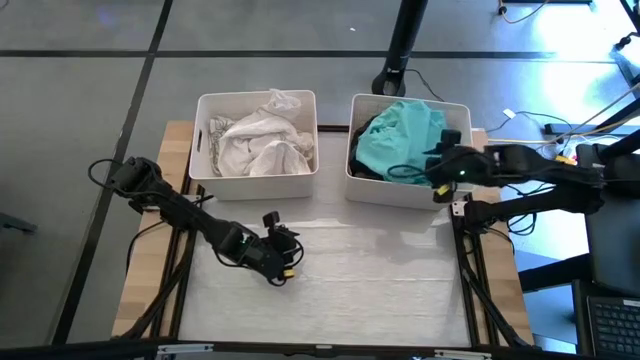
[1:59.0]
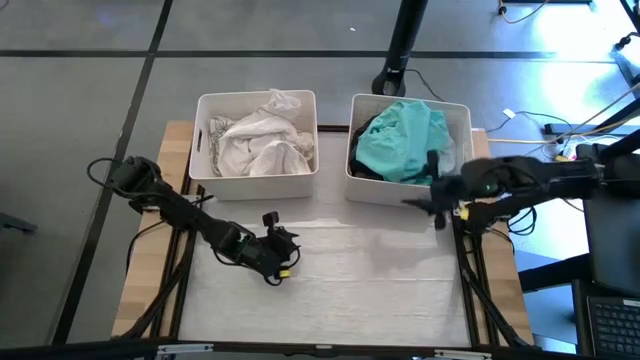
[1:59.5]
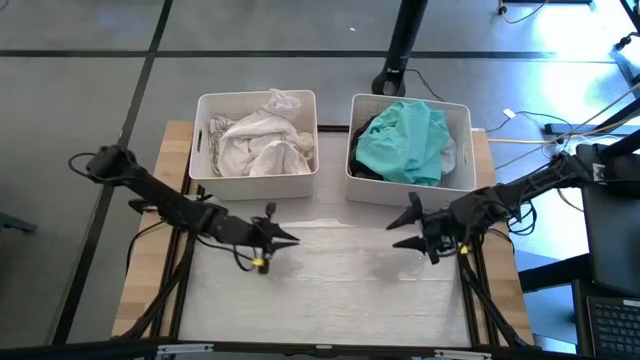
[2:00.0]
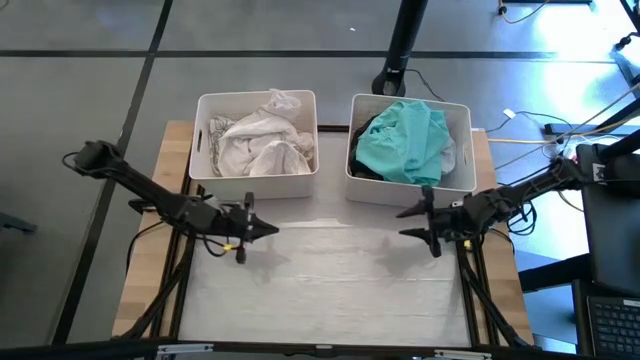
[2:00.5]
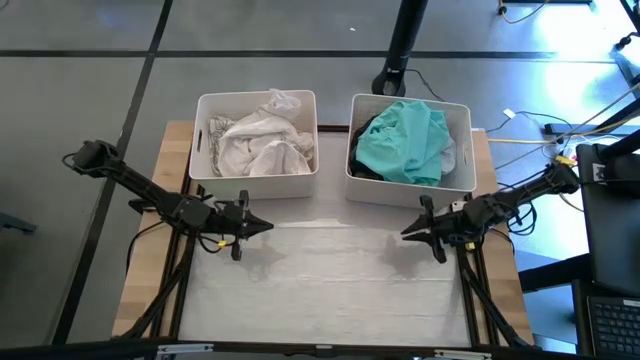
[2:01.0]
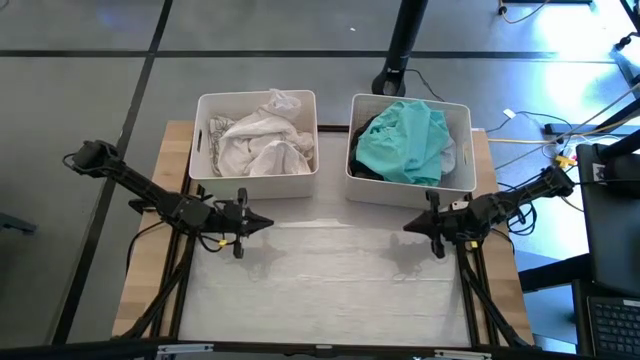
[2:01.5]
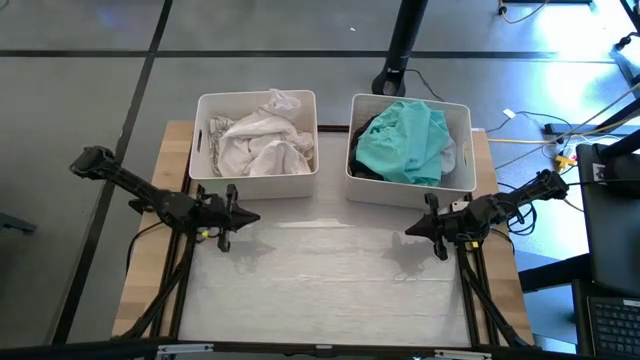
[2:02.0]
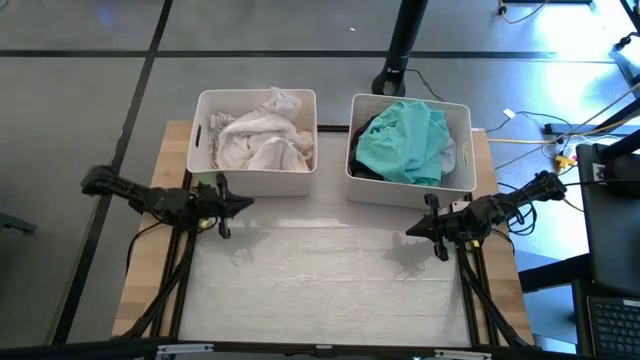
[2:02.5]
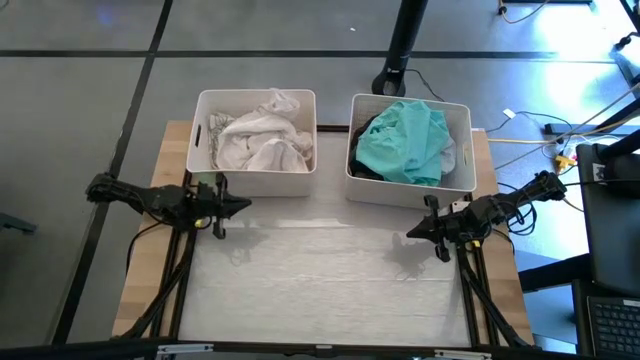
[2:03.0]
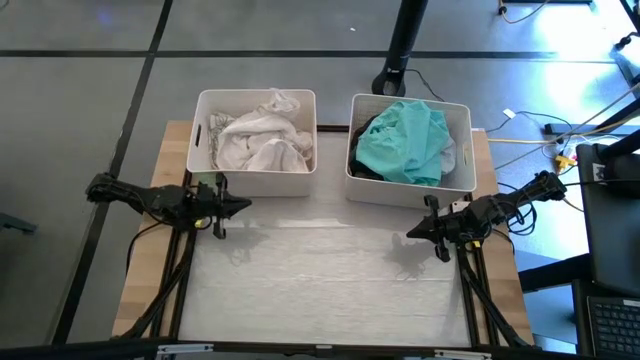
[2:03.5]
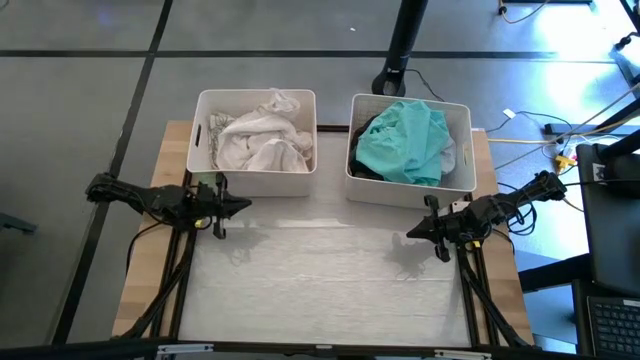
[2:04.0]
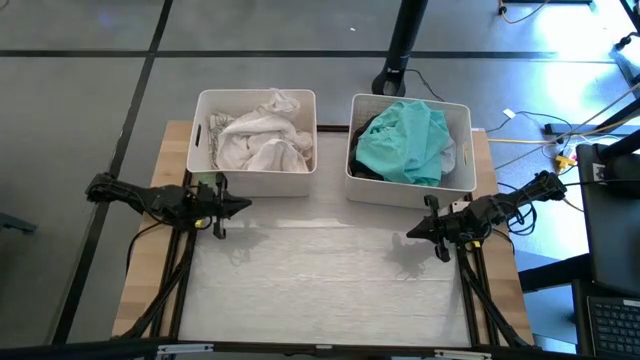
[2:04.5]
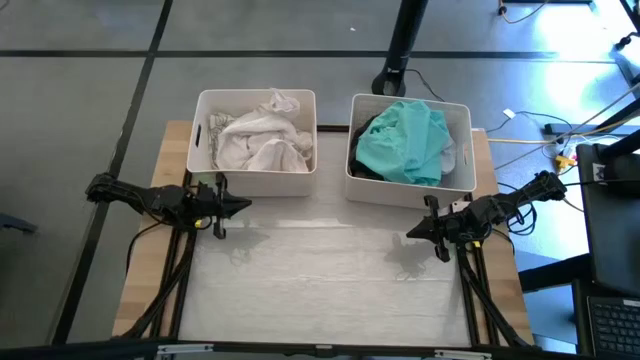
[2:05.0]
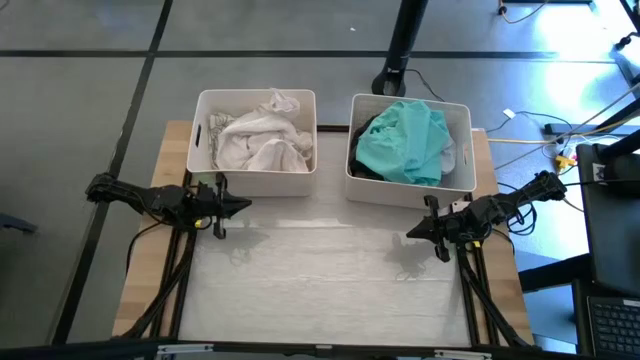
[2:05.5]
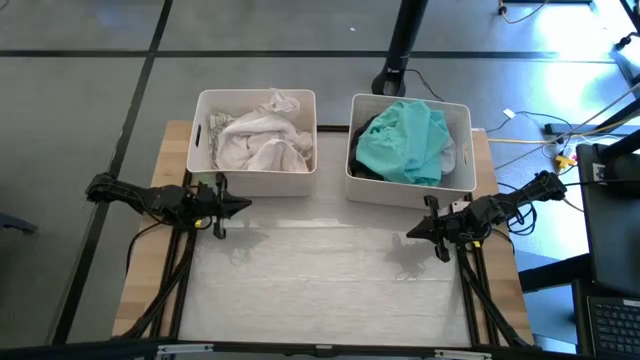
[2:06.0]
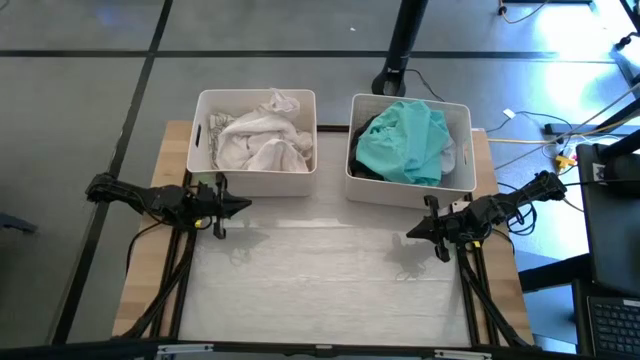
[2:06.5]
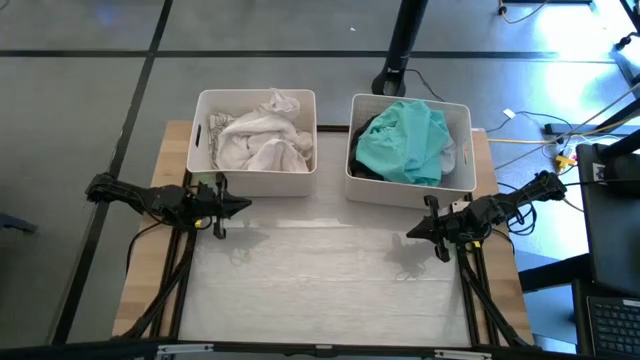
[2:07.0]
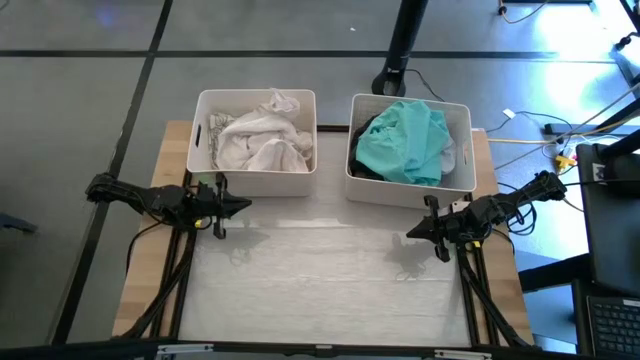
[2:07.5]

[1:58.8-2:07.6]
Task: Sort clothes
Return to Home Position

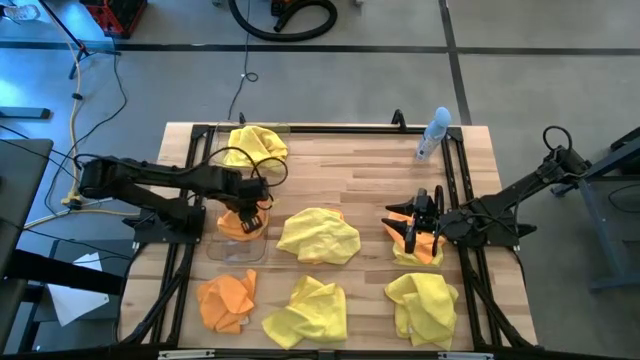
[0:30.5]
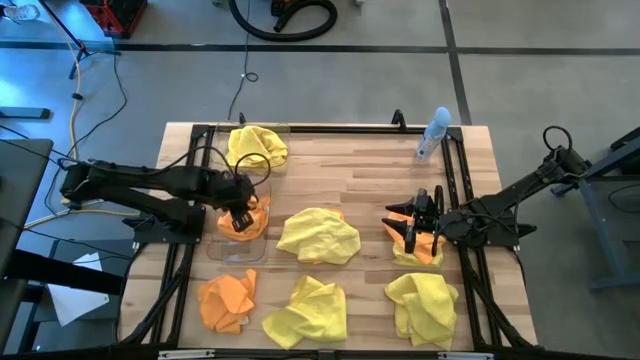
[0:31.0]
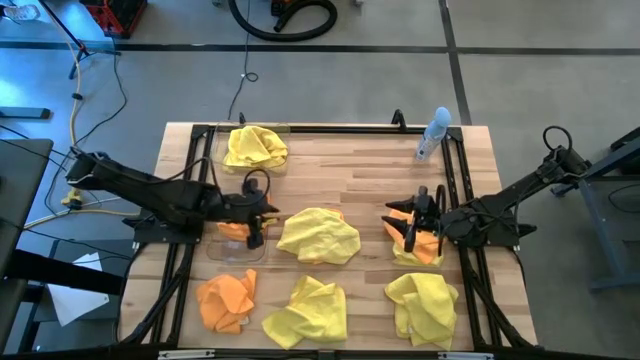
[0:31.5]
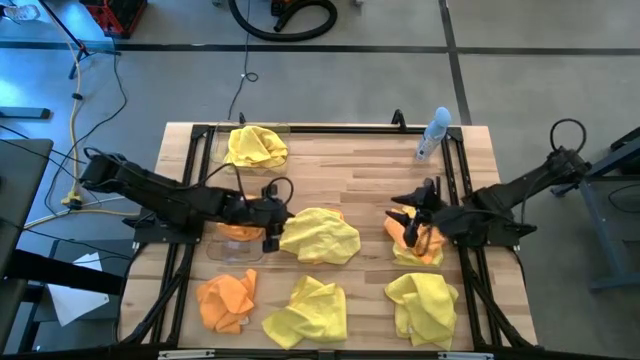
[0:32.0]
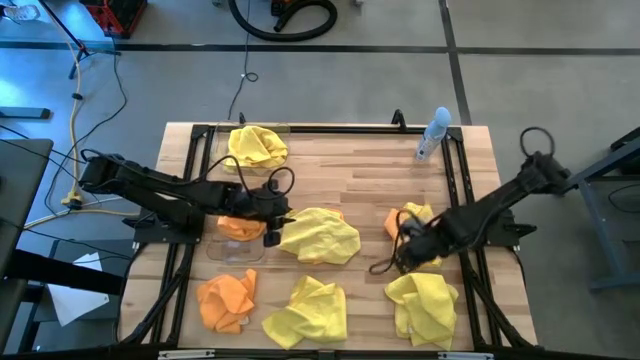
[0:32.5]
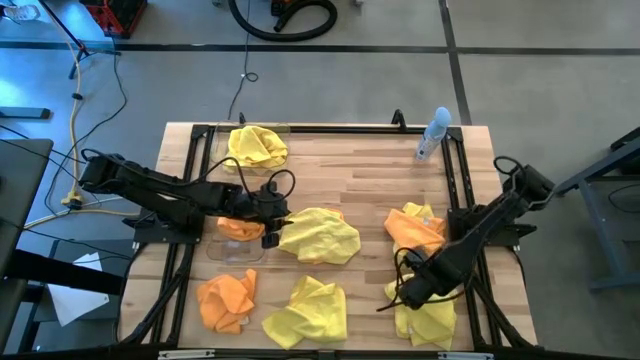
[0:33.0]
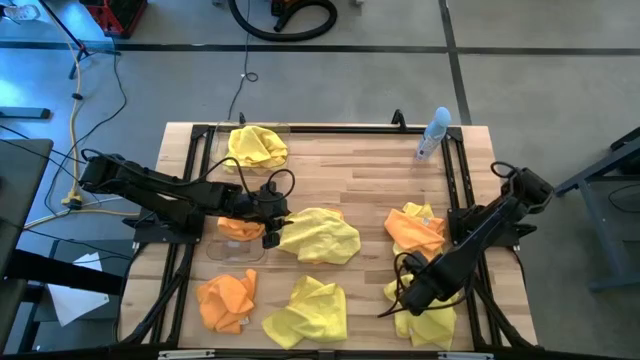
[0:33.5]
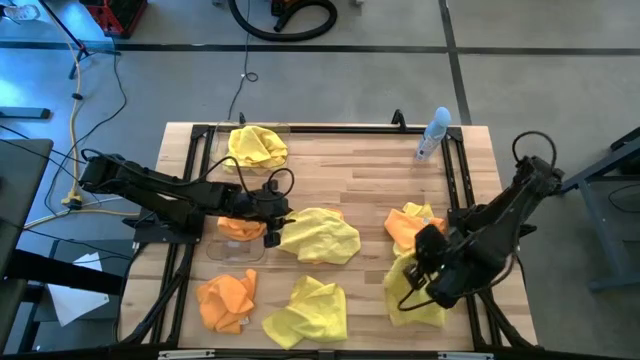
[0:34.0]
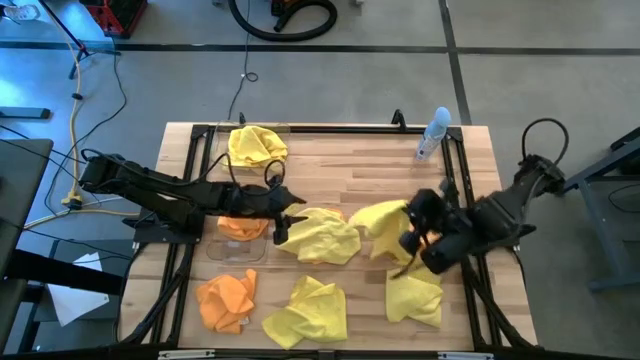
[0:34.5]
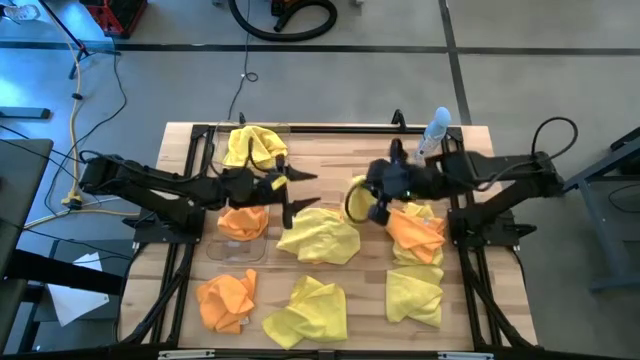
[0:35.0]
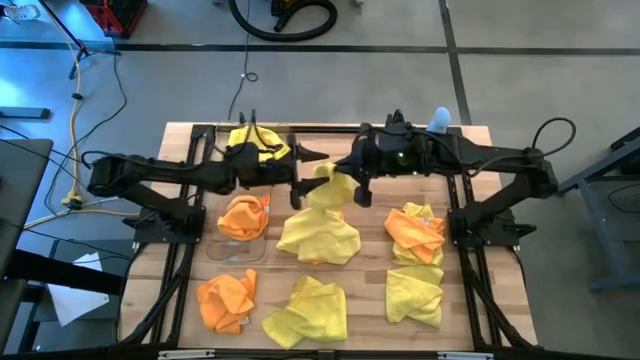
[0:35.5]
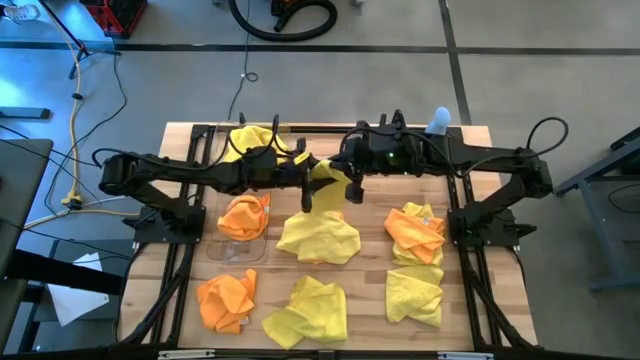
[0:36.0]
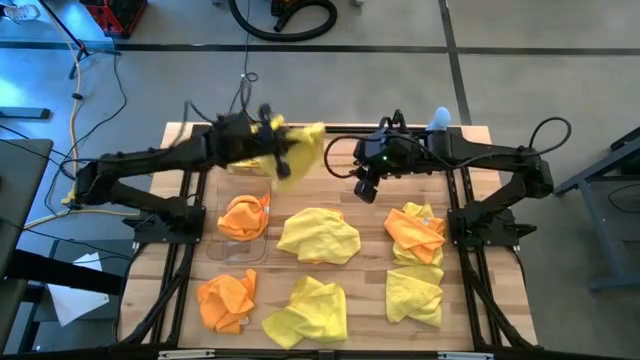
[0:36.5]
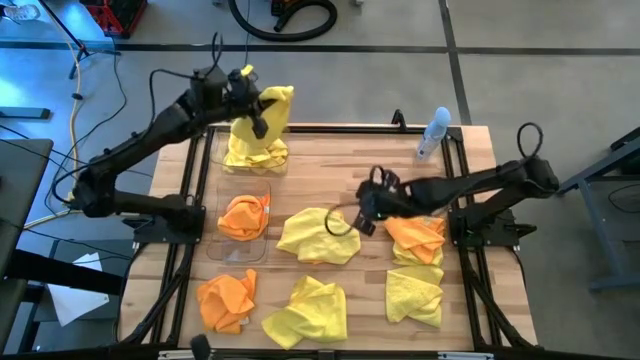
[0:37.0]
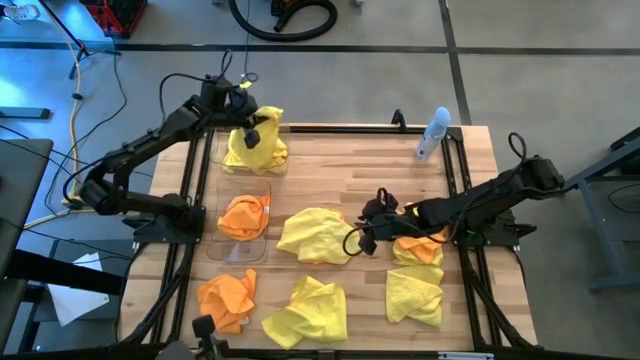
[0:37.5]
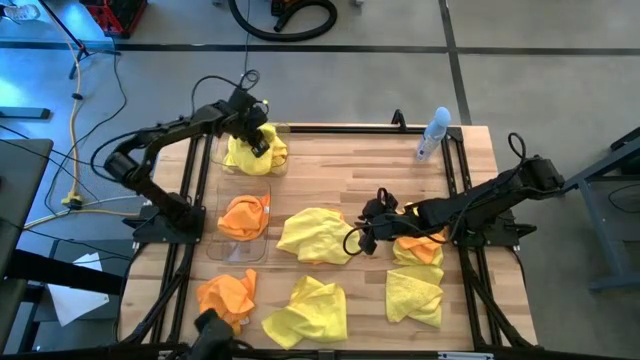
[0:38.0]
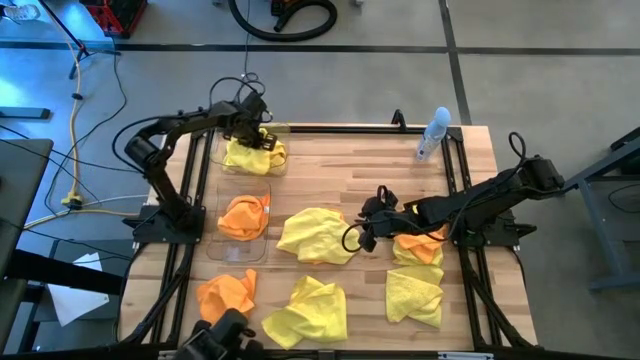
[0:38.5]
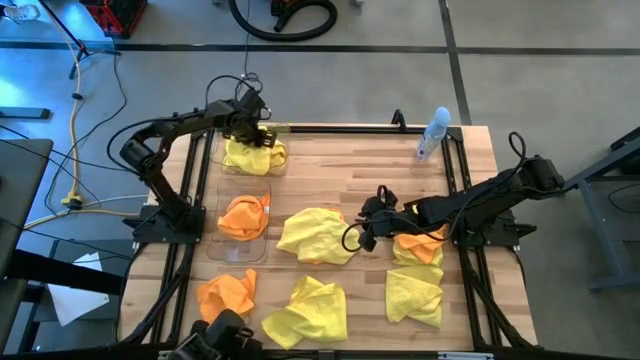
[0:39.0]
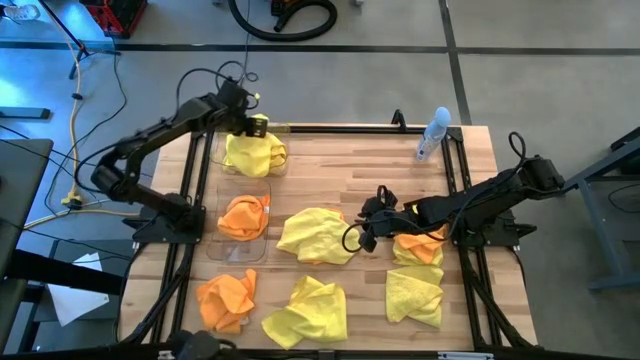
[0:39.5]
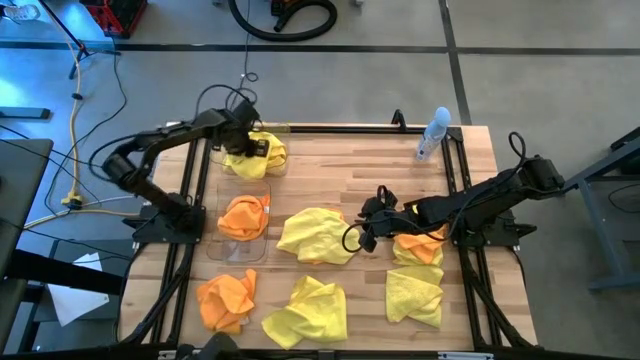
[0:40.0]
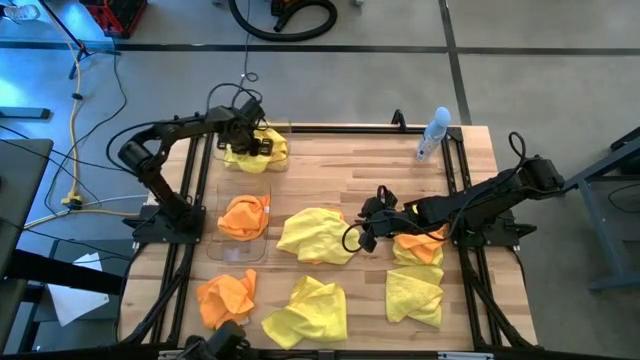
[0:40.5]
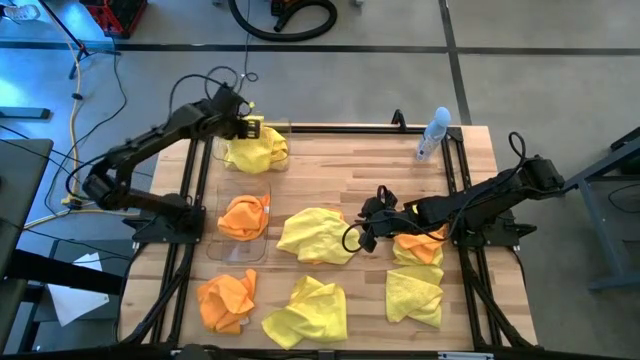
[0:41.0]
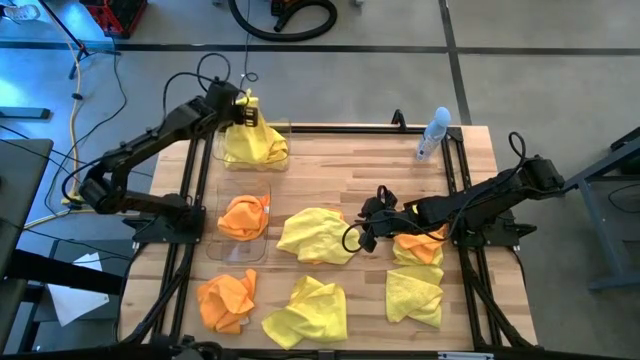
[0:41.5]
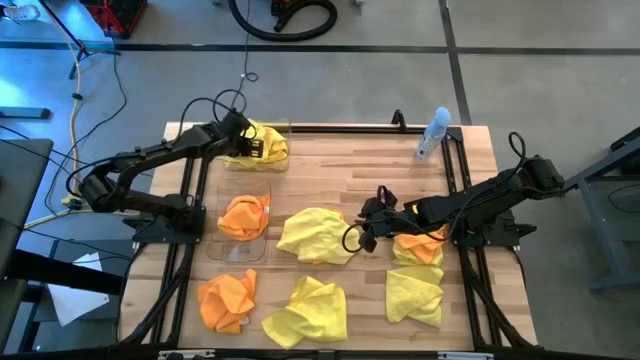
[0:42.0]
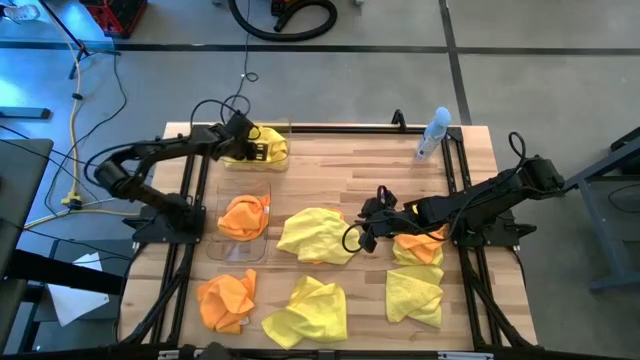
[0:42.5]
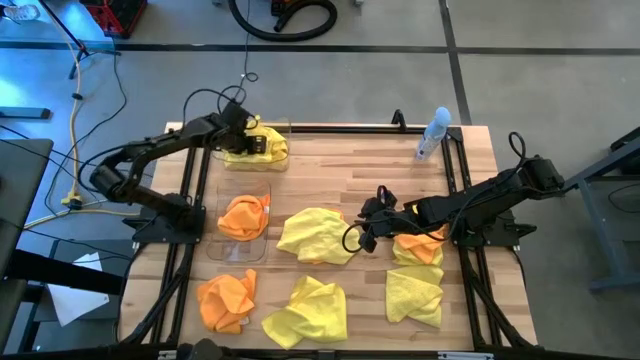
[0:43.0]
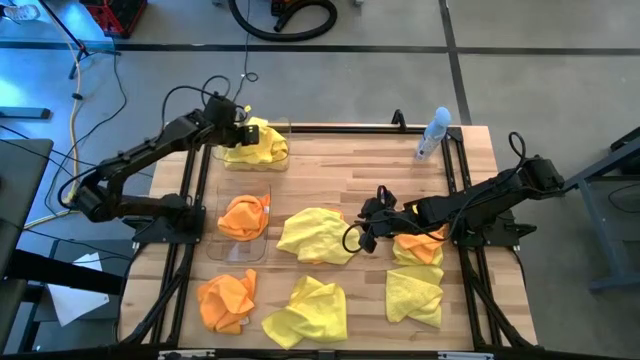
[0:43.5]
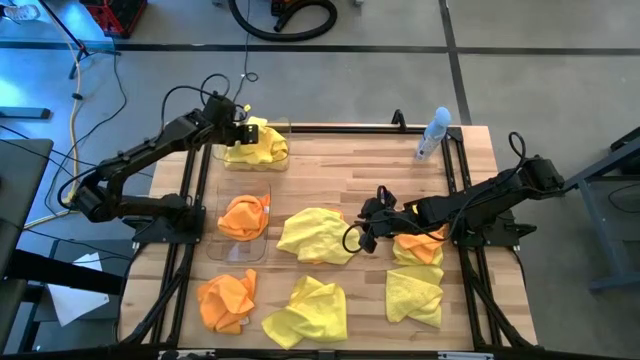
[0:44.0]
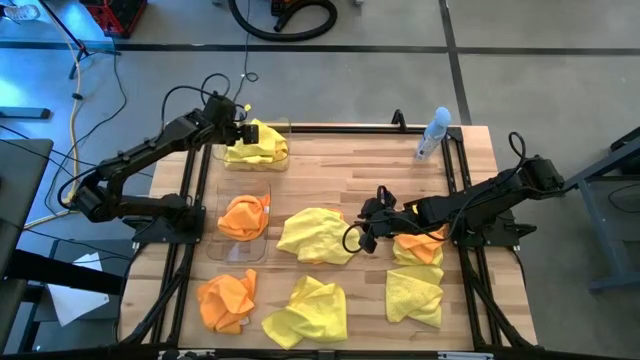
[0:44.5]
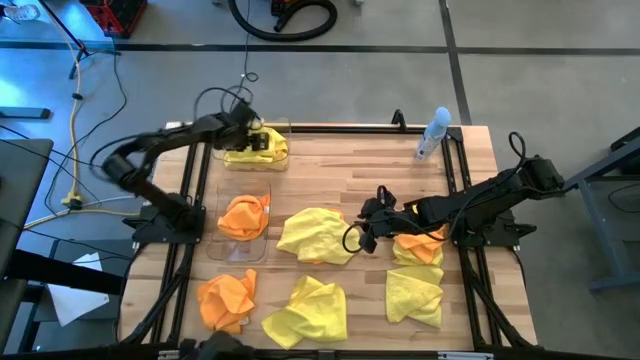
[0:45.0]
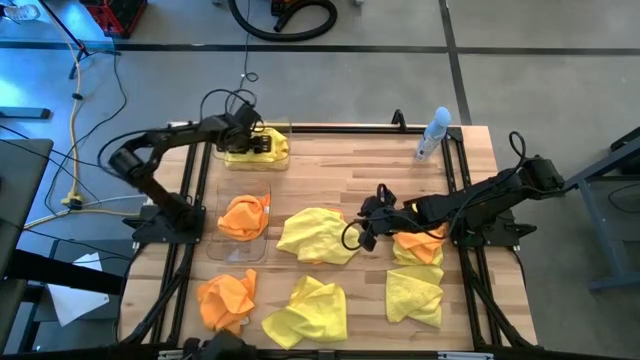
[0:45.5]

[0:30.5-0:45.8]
Task: Sort microfiber towel by color & place in baskets
Put the yellow microfiber towel into the top transparent bin
